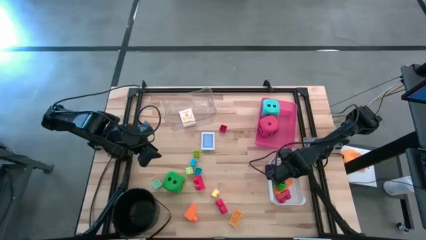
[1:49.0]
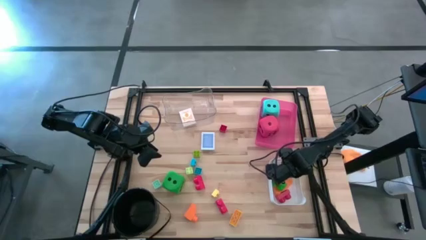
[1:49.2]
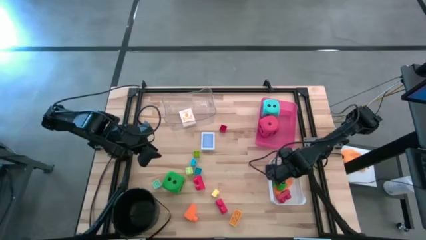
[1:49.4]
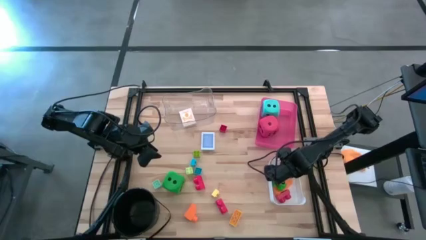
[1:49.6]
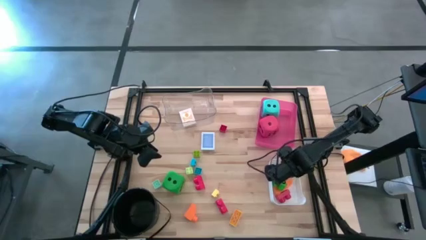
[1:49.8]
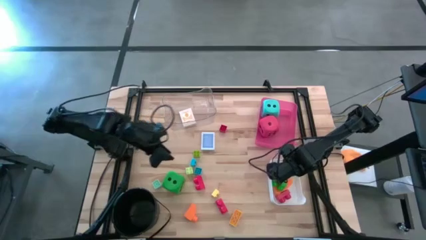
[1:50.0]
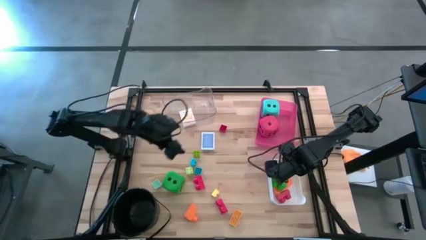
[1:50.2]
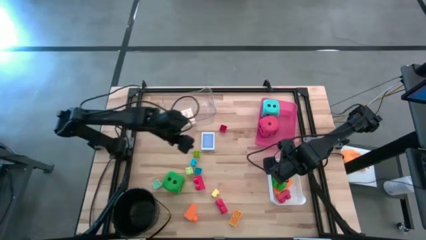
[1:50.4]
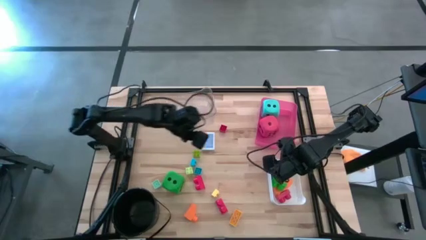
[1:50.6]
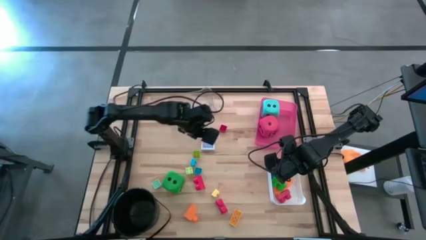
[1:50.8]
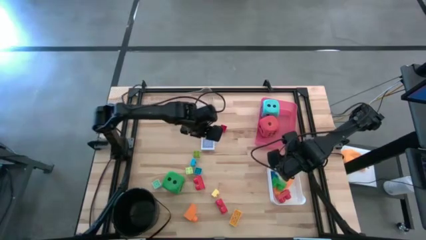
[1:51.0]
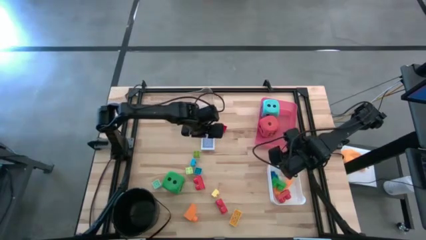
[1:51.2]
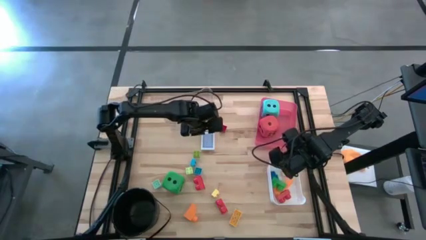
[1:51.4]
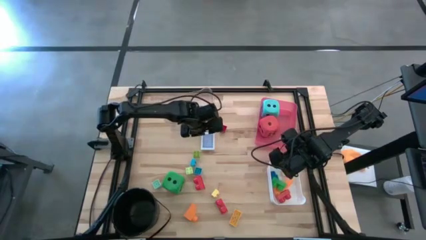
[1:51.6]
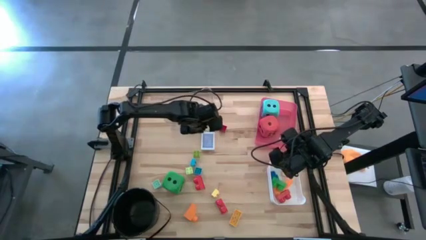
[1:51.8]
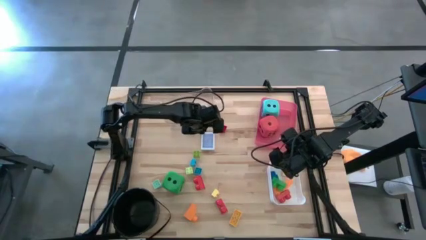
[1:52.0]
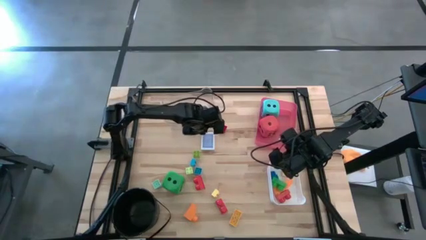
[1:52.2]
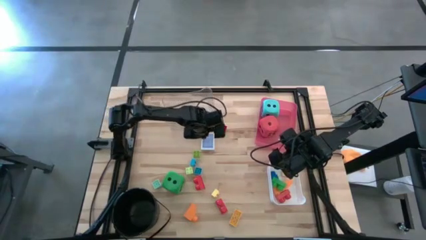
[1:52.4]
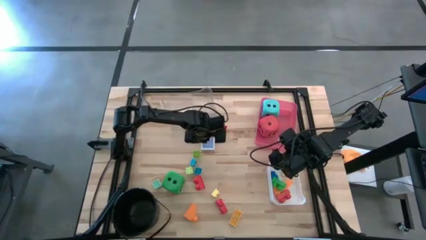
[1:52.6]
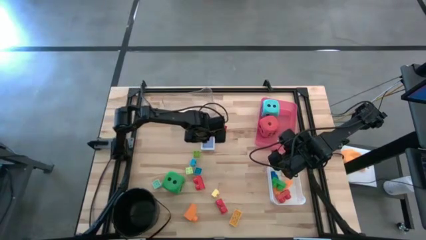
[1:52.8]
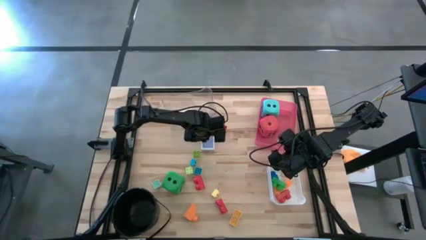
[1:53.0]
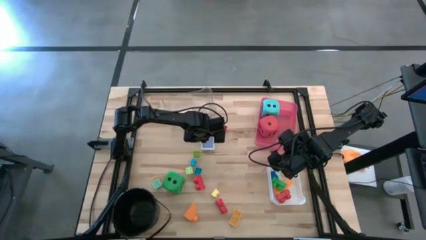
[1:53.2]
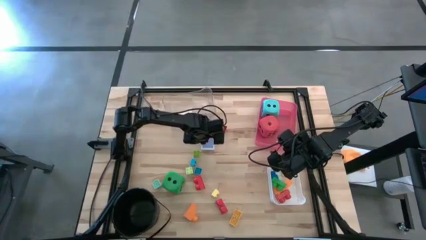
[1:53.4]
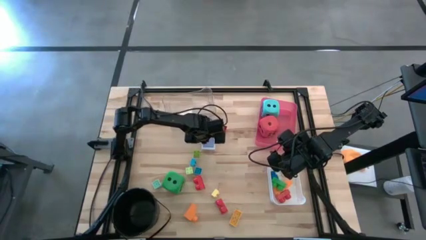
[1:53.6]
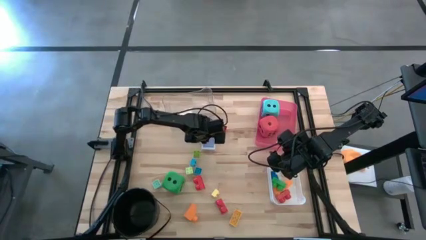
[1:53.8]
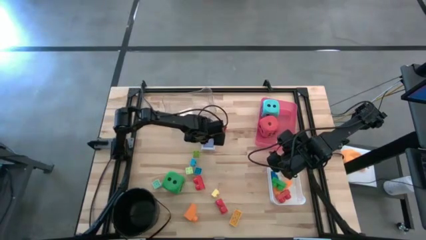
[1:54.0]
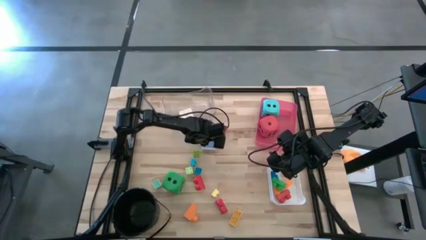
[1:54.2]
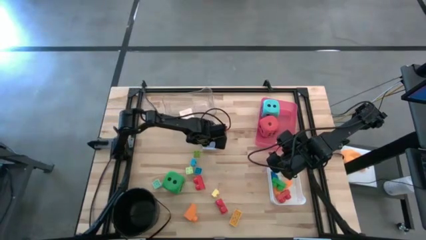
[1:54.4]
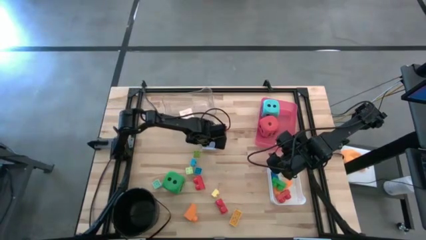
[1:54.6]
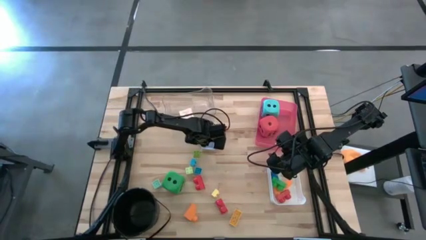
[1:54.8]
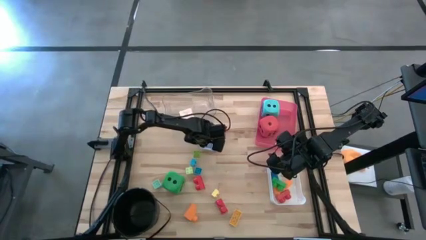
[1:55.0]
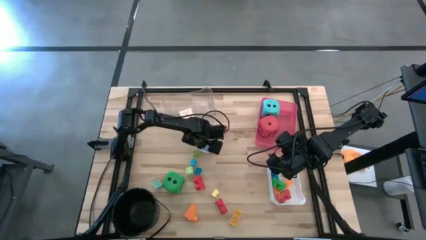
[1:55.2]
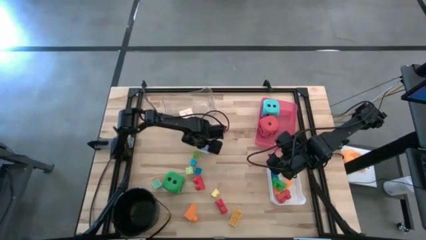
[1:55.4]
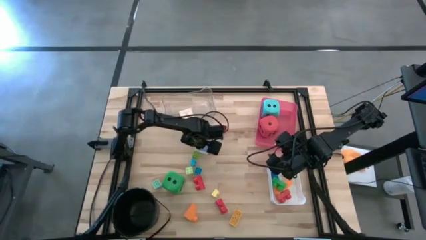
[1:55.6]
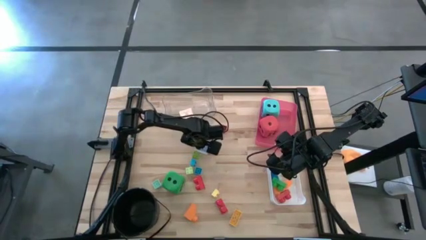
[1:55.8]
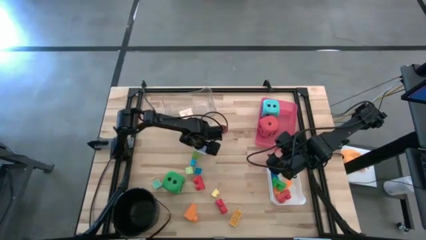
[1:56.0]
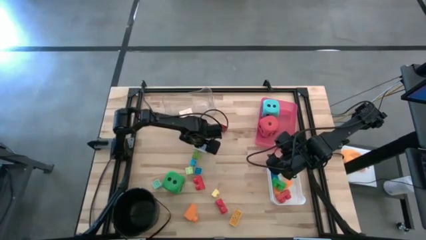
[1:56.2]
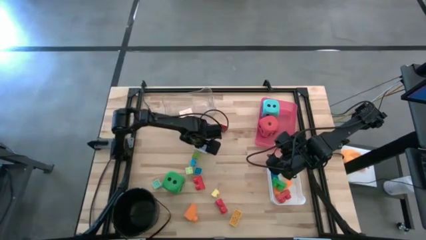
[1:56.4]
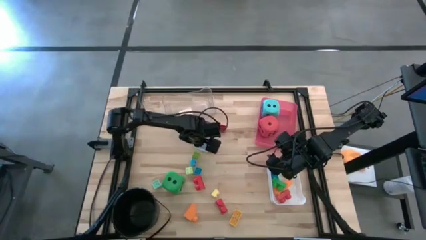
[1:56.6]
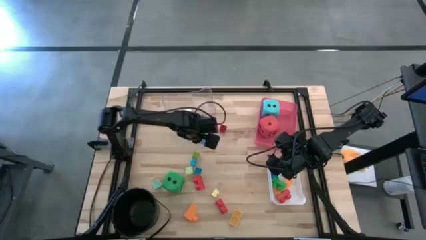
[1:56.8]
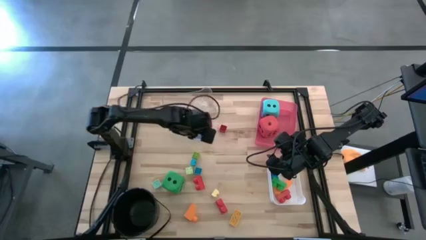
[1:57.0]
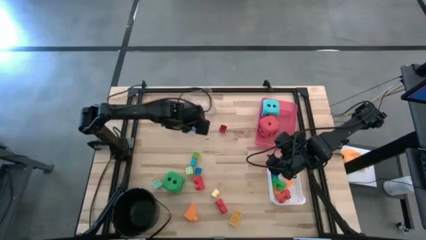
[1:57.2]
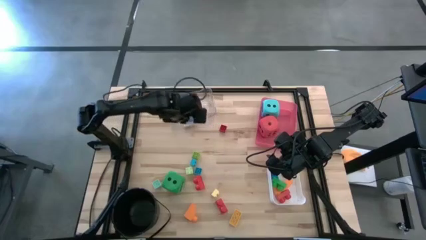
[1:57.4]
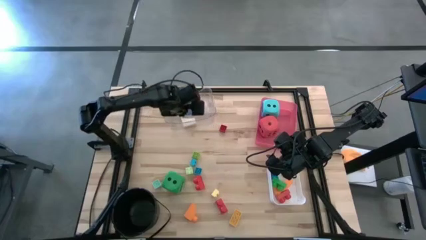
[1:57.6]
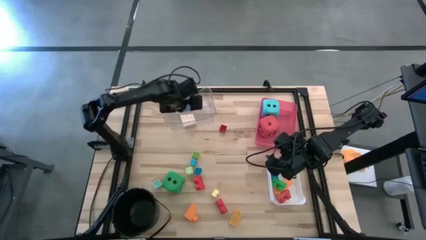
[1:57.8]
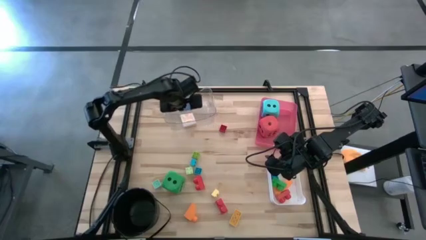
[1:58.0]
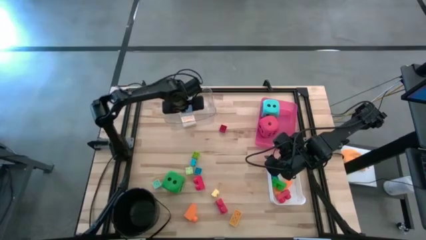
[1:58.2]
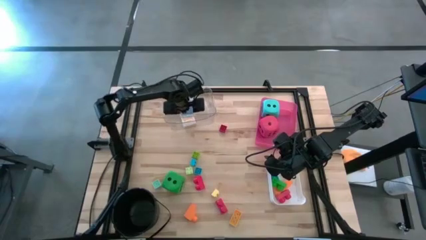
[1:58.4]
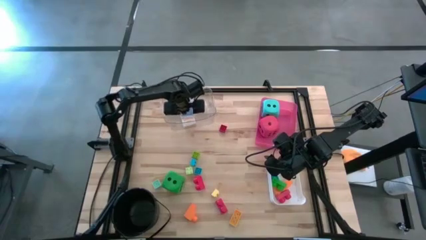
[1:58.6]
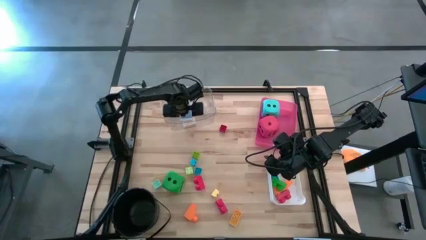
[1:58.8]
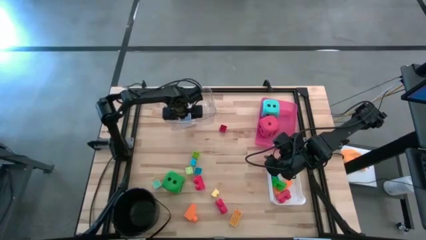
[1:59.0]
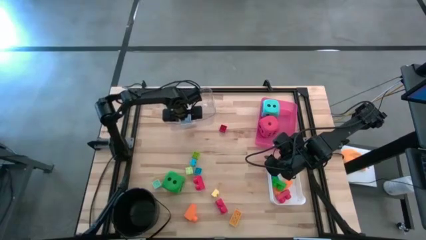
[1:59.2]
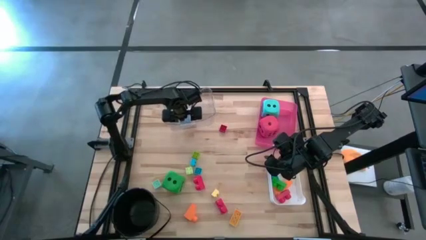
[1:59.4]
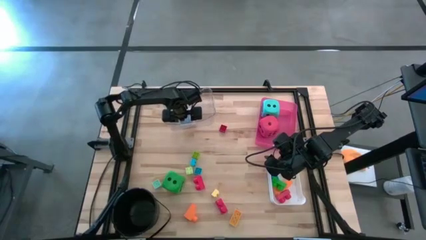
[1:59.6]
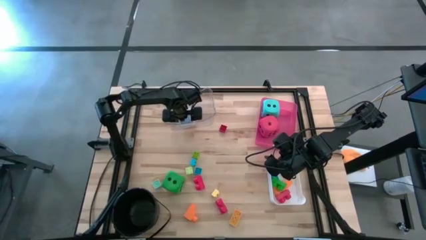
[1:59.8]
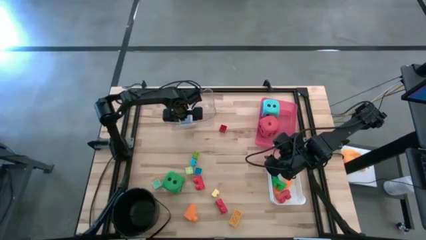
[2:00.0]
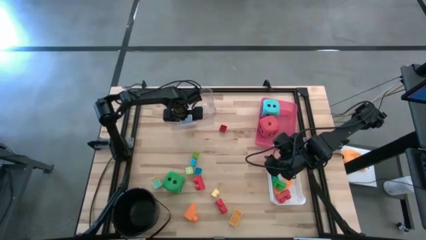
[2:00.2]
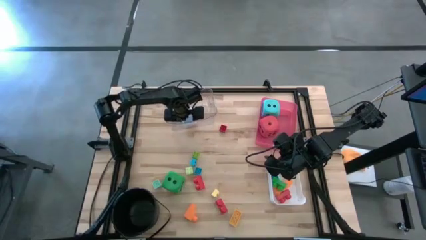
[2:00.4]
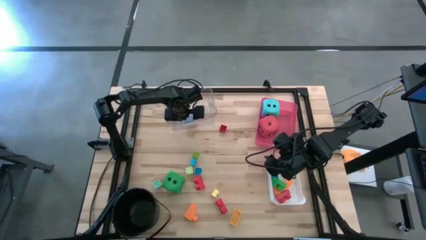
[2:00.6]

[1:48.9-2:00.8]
Task: Pick & Place Toys
Put the blue deck of cards box into the transparent bin

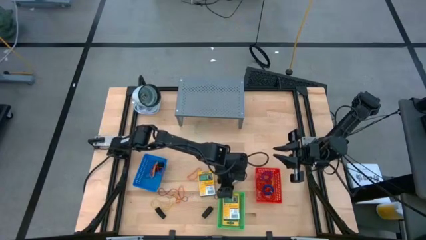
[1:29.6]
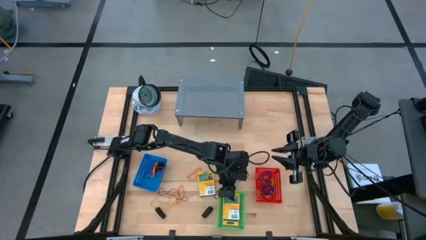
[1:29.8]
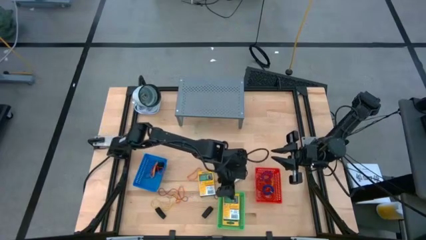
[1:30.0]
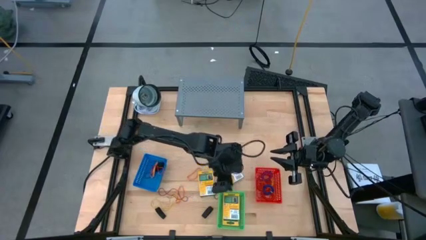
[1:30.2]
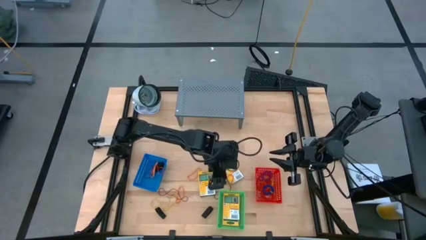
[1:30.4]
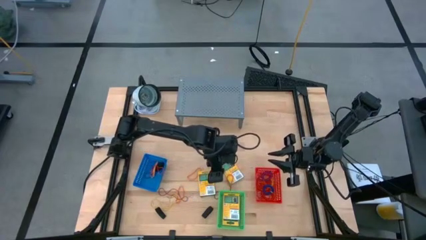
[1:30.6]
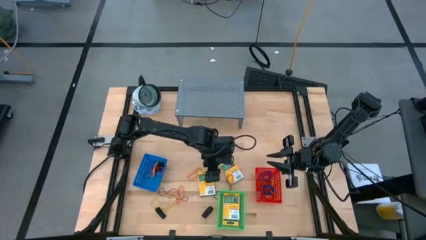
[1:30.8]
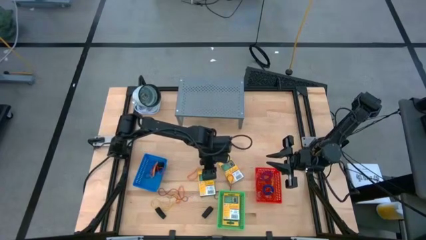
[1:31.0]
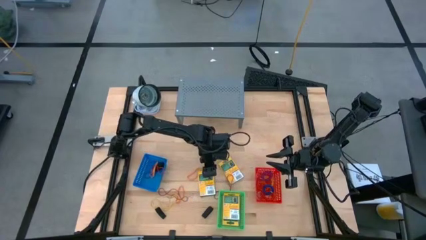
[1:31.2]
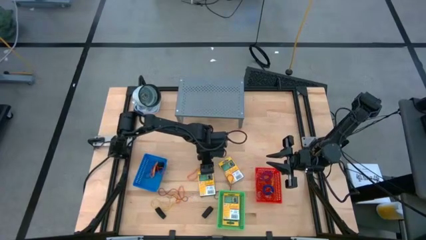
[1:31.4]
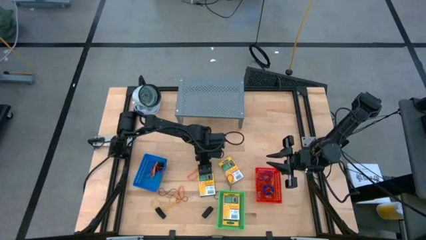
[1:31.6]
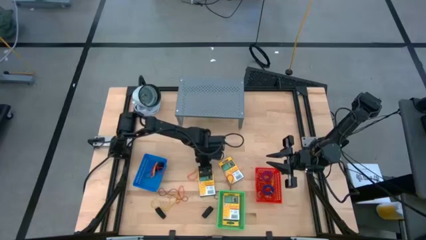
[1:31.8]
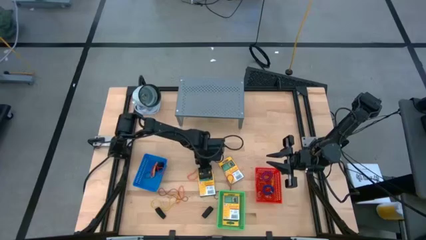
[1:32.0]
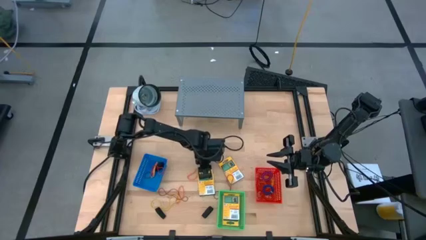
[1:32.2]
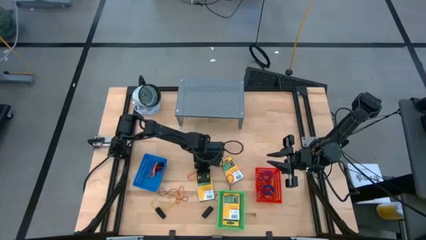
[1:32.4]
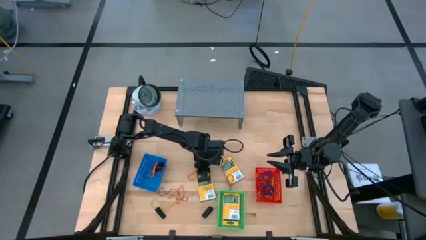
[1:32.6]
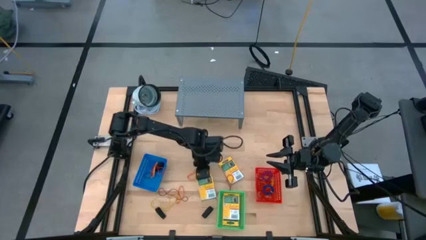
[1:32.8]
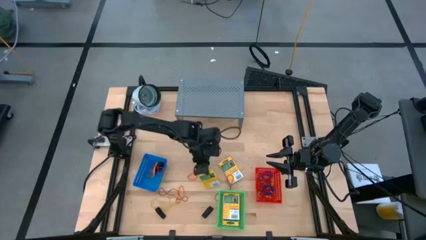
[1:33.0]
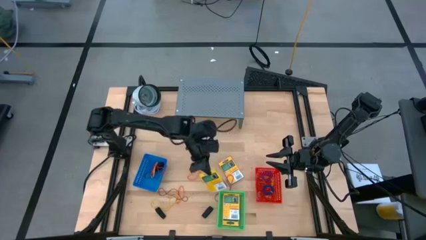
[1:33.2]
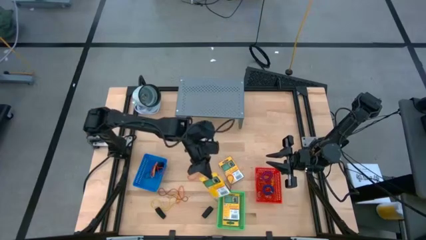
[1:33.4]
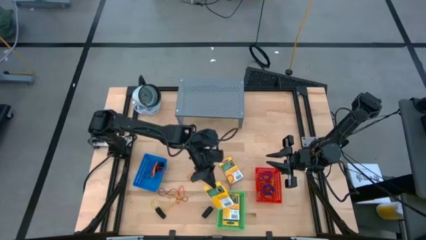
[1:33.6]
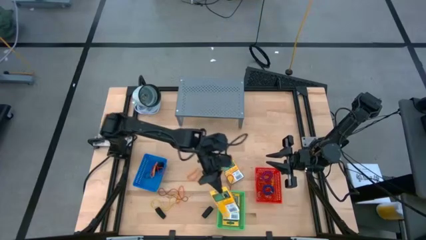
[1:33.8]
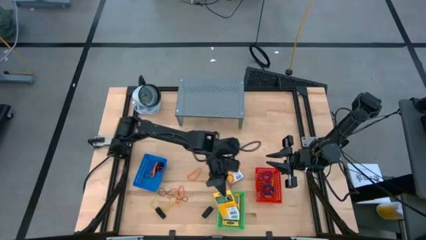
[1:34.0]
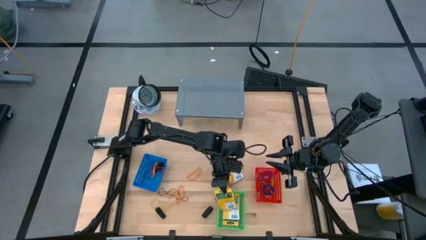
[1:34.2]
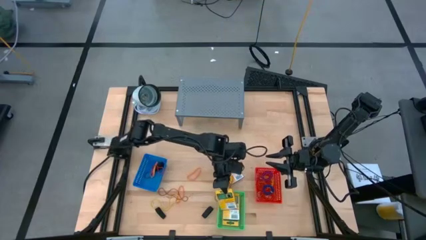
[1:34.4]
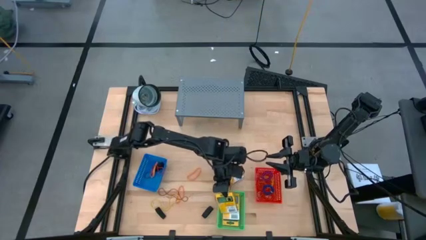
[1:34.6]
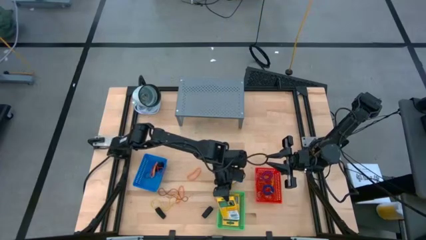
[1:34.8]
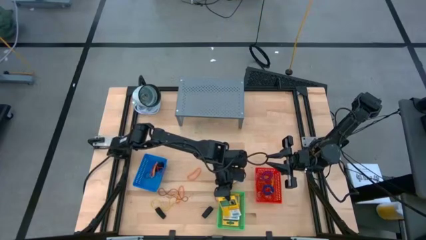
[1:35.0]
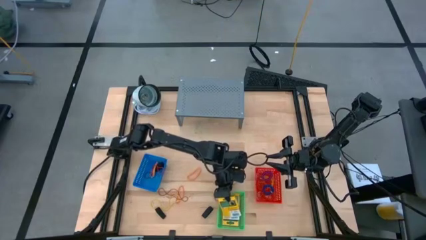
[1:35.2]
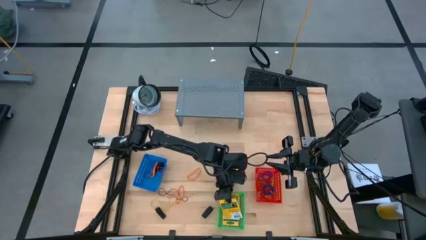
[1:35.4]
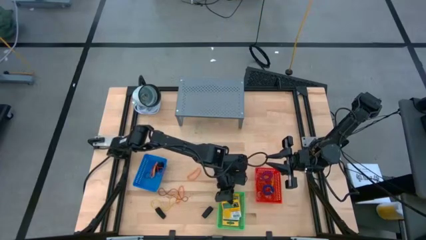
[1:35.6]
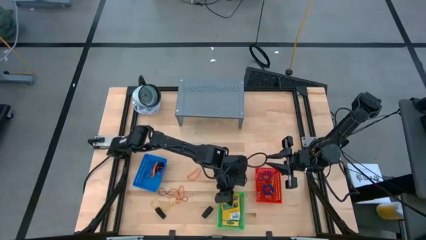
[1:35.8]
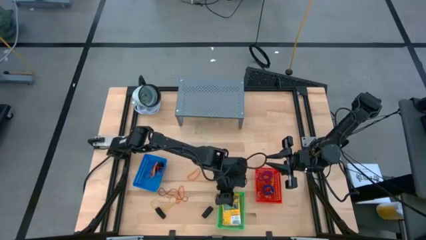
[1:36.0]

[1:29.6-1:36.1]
Task: Pick & Place Office Desk Supplies
Put the yellow crayon box into the green bin
